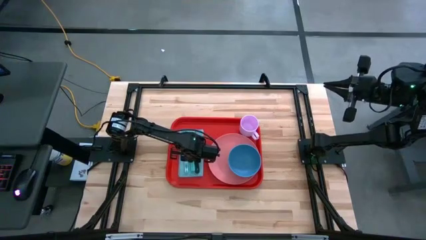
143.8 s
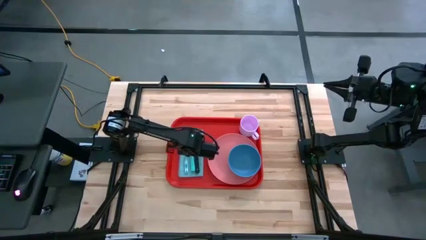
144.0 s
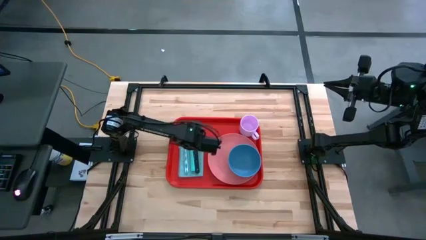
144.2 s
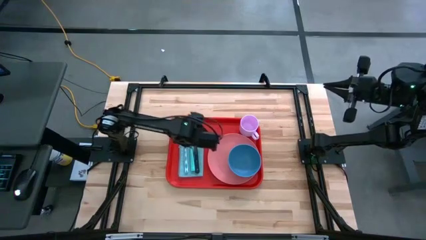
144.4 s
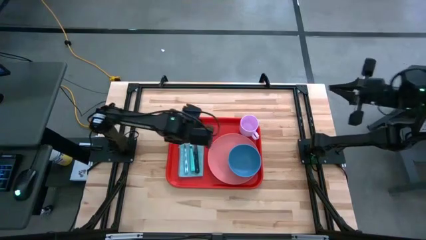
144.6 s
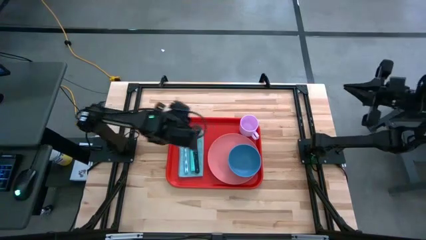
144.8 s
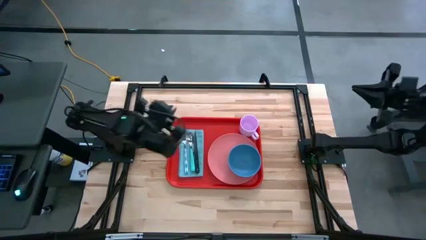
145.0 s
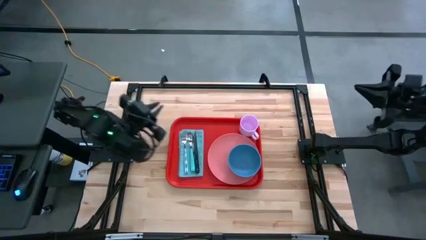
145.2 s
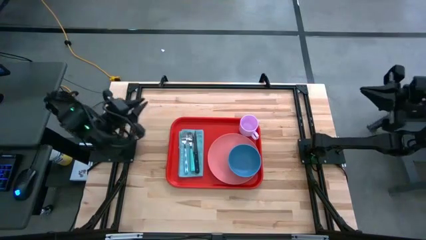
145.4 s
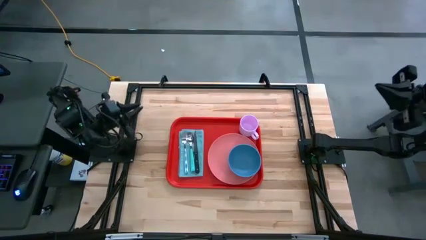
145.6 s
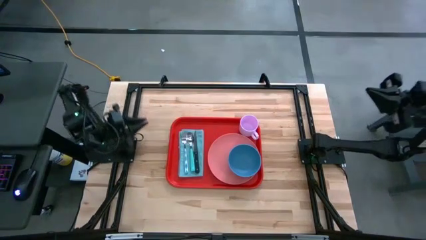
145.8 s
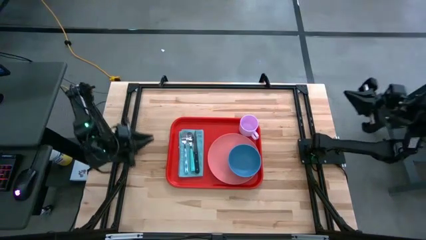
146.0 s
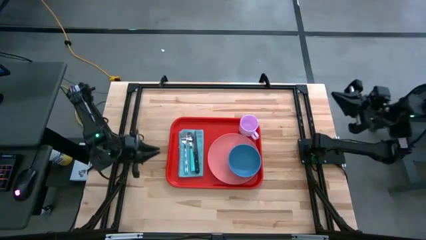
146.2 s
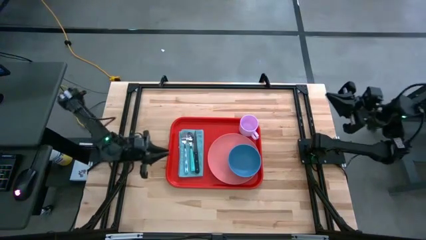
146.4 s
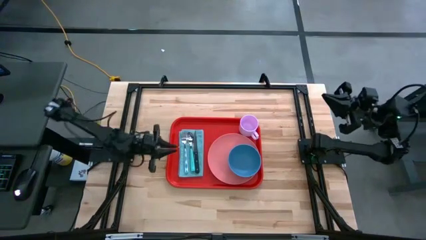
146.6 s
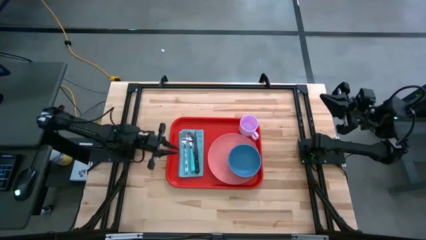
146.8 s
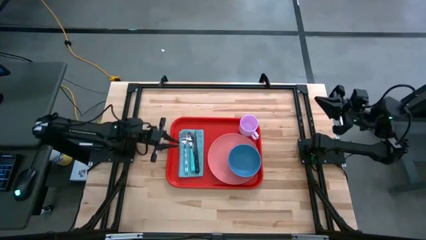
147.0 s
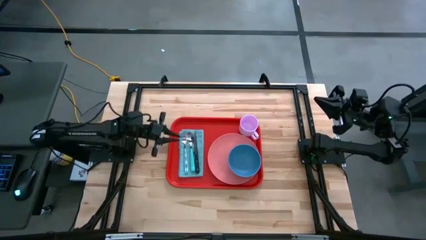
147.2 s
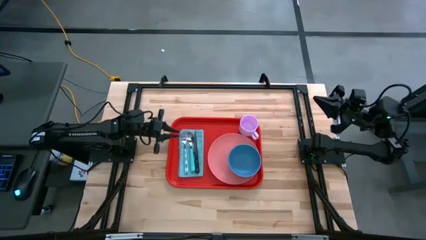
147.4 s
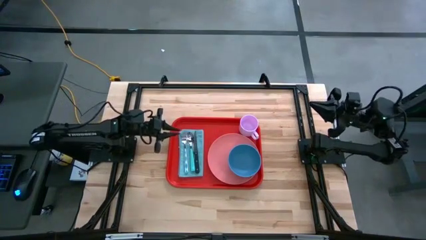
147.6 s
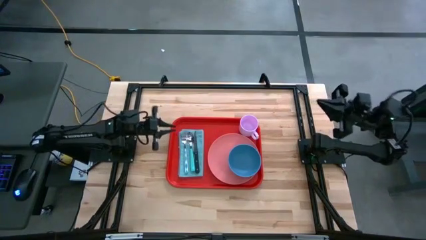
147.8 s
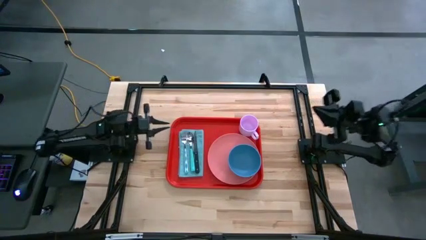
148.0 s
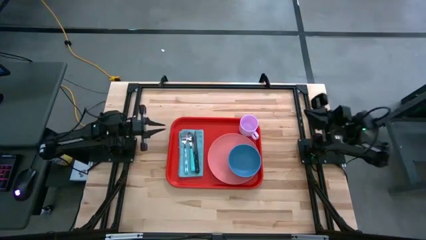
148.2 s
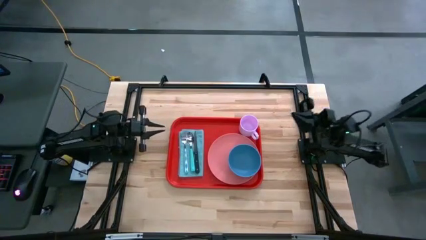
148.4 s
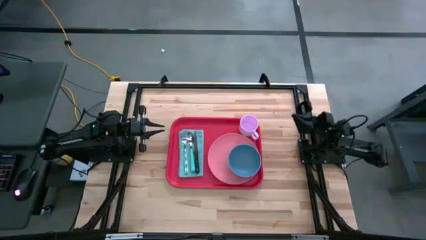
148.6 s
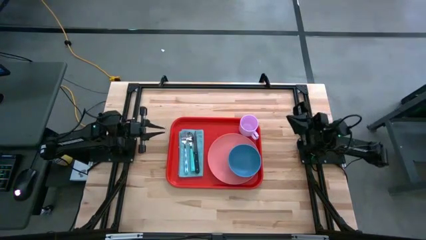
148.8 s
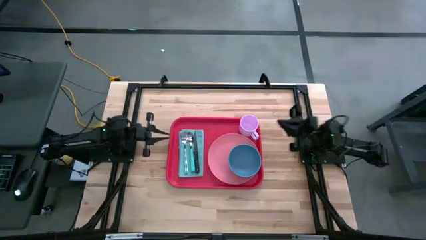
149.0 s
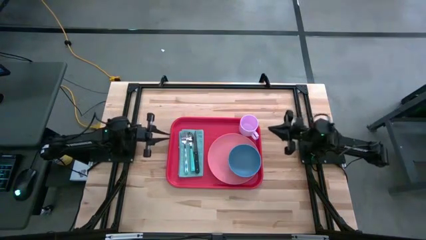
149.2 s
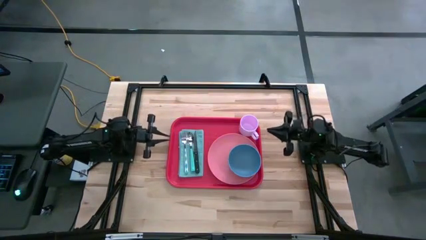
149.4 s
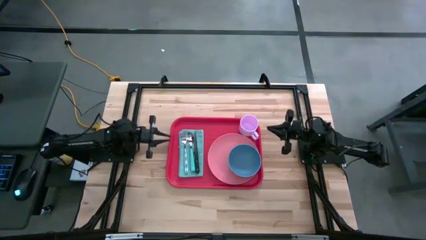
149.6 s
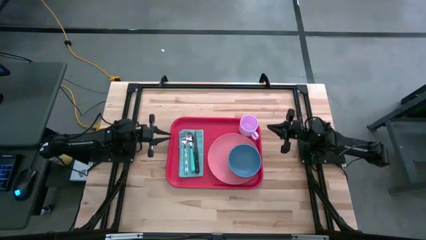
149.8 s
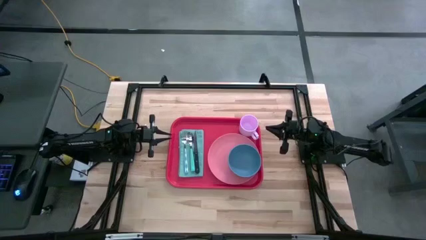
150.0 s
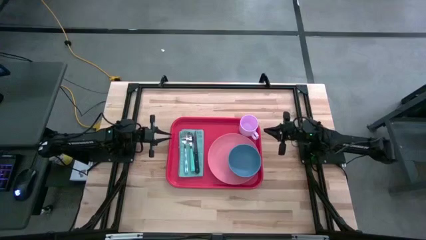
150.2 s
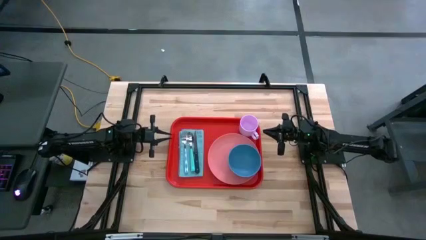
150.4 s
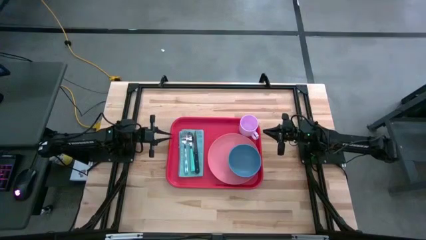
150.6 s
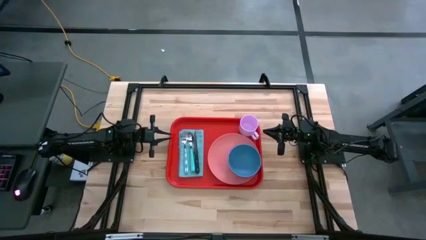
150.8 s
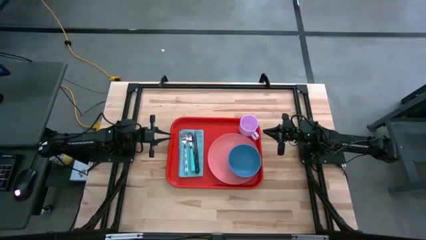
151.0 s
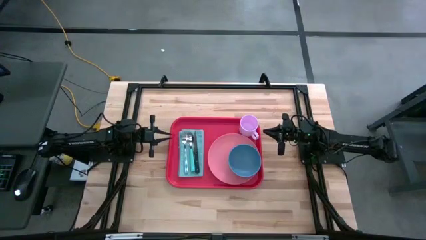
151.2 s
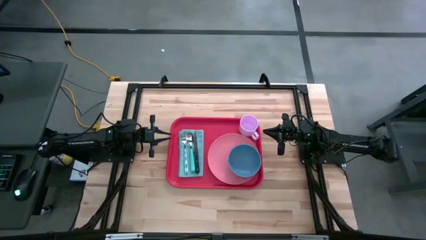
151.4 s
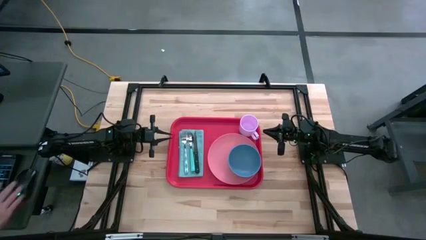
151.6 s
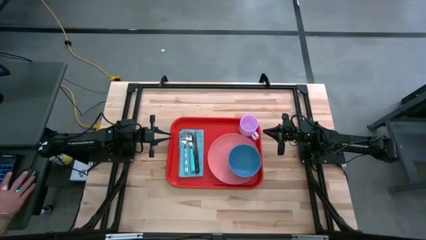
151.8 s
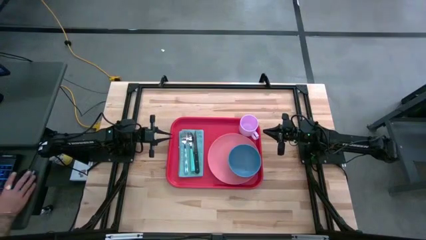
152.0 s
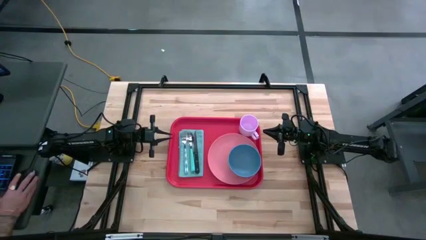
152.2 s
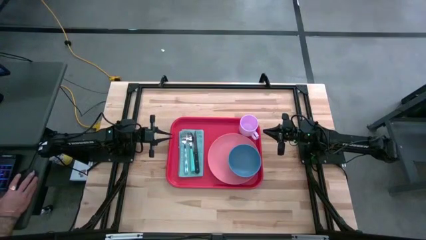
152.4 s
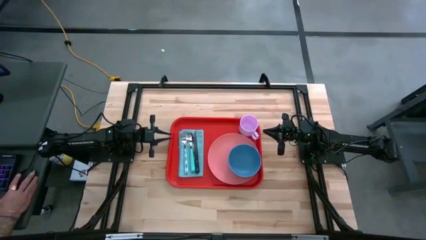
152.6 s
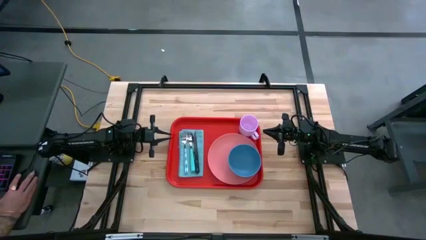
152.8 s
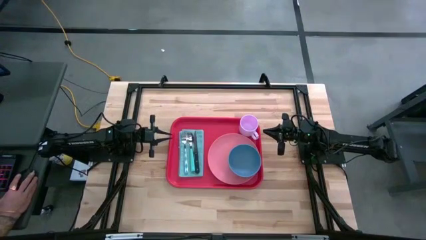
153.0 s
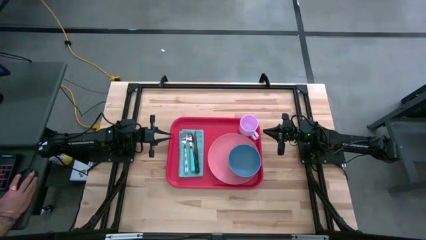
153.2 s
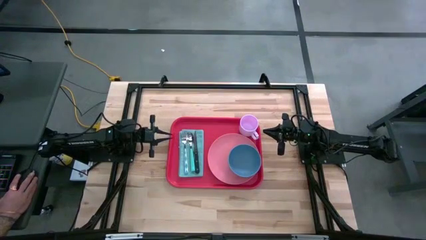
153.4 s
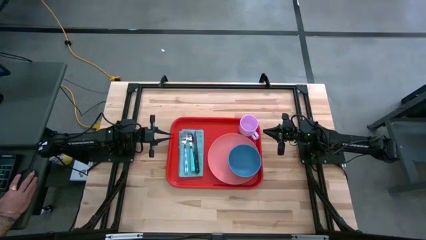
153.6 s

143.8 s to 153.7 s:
Task: Set up tray
Return to Home Position

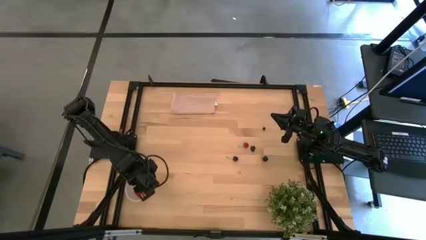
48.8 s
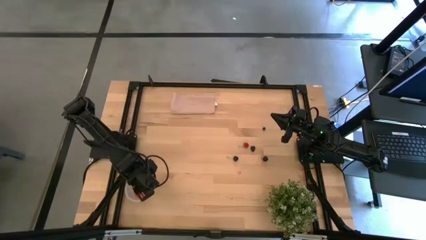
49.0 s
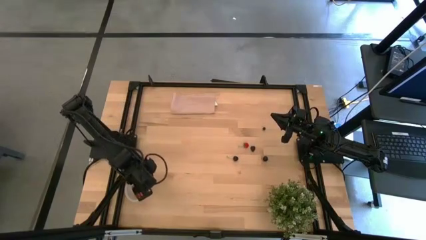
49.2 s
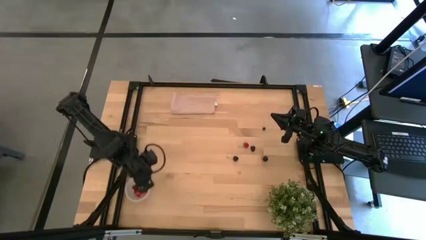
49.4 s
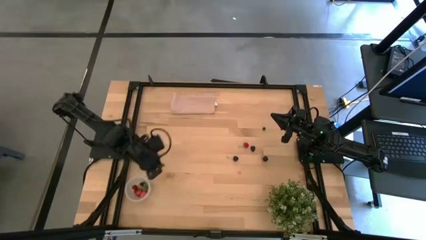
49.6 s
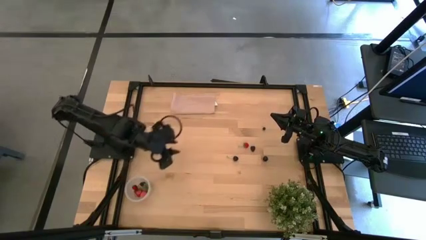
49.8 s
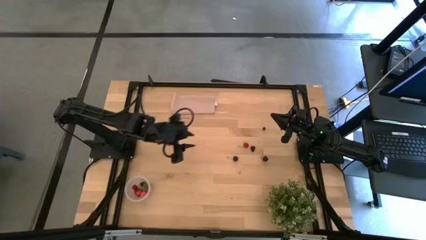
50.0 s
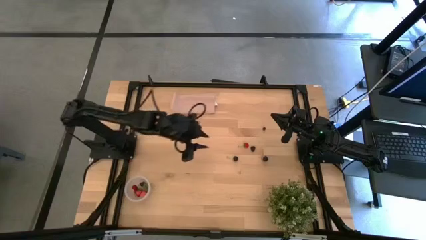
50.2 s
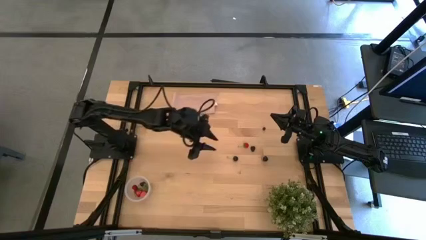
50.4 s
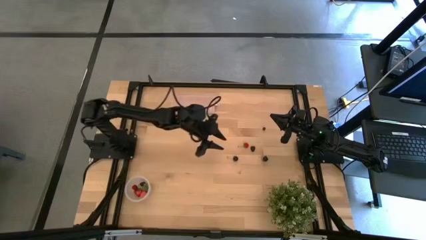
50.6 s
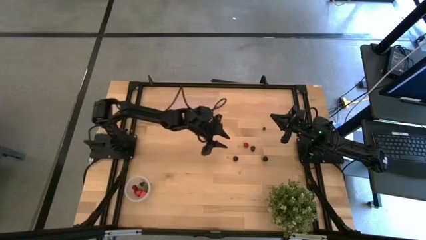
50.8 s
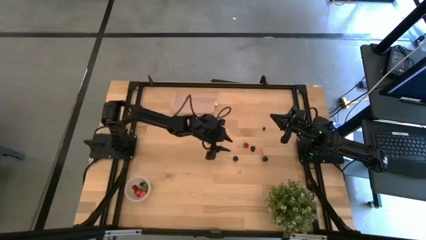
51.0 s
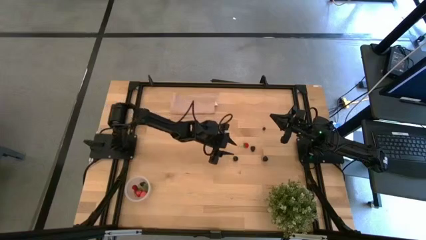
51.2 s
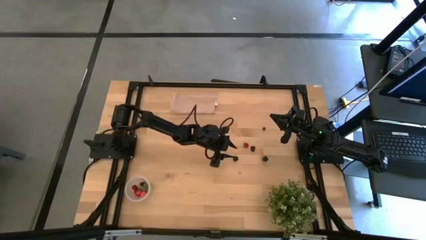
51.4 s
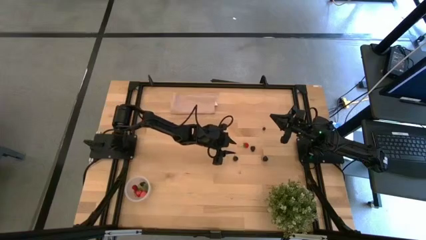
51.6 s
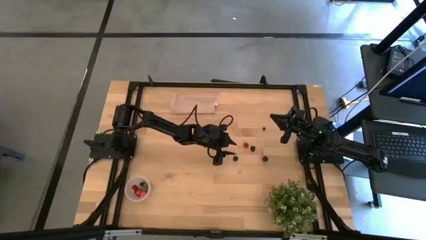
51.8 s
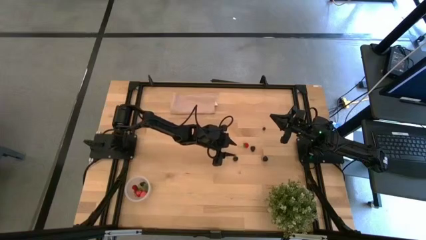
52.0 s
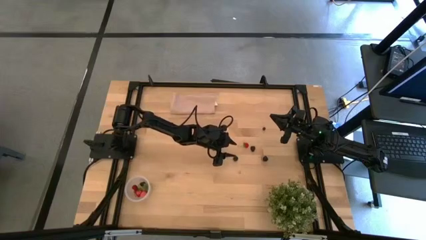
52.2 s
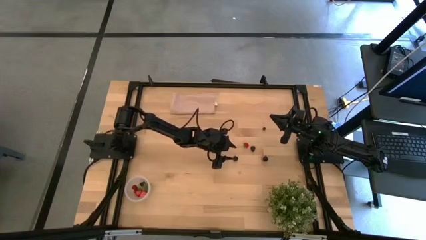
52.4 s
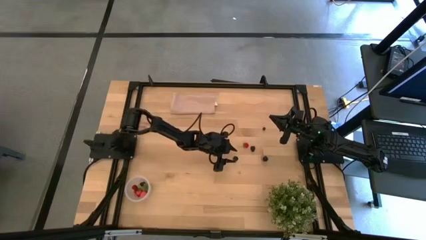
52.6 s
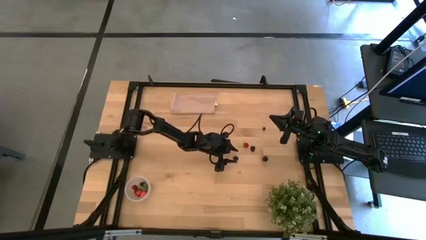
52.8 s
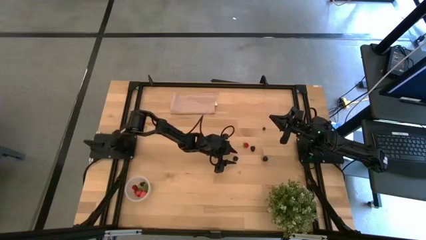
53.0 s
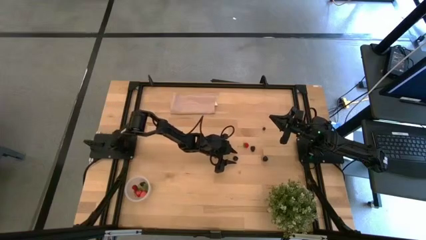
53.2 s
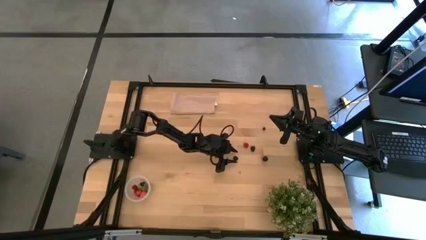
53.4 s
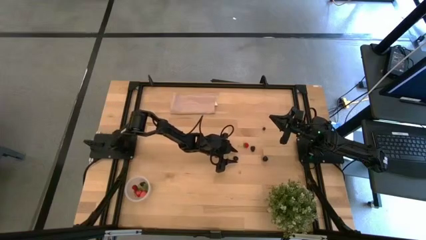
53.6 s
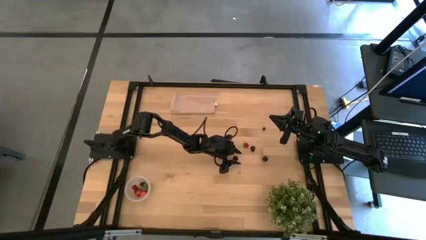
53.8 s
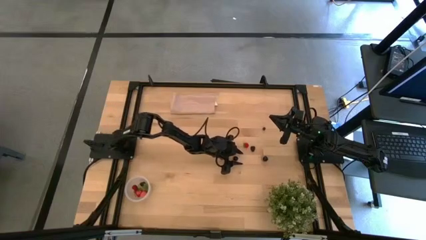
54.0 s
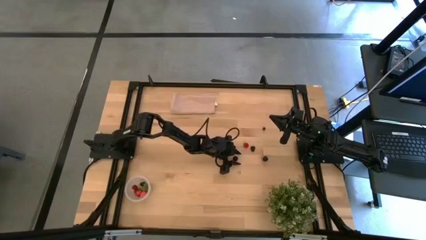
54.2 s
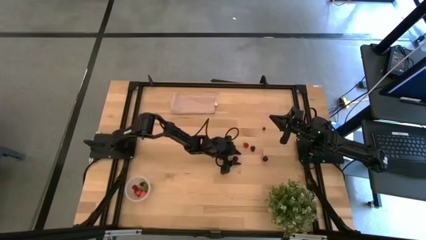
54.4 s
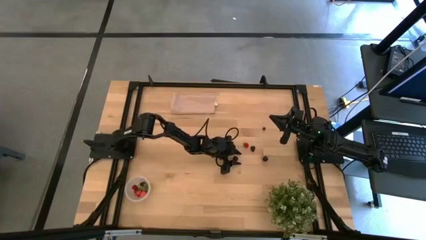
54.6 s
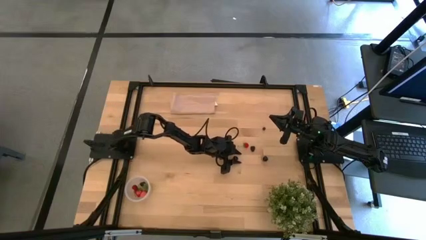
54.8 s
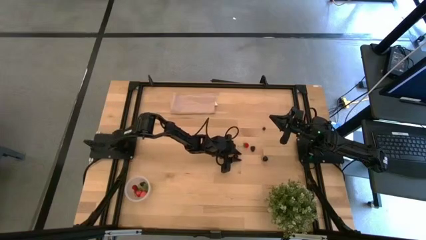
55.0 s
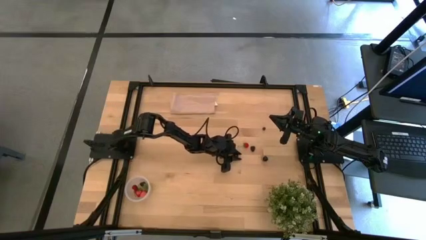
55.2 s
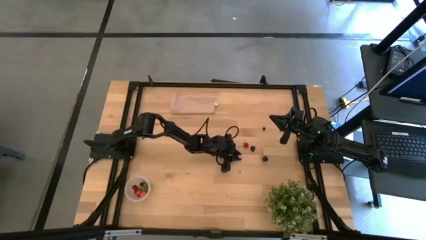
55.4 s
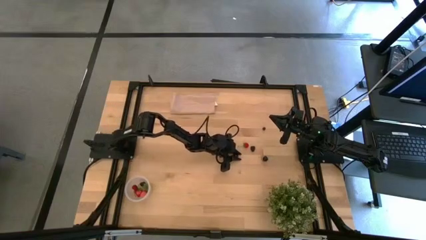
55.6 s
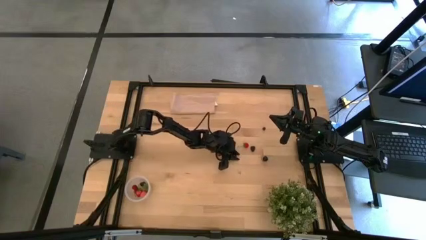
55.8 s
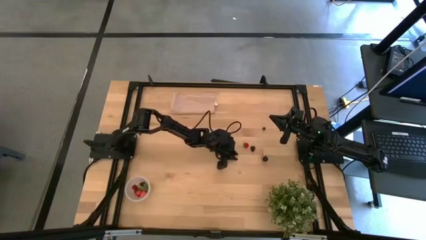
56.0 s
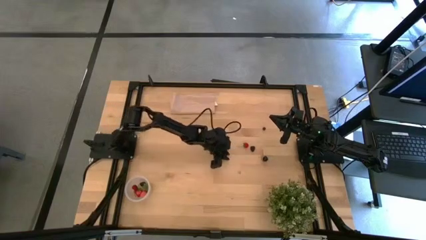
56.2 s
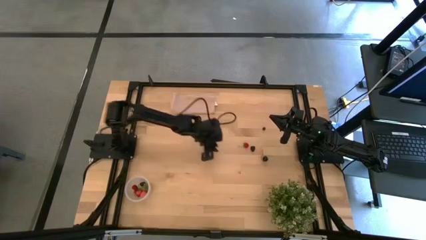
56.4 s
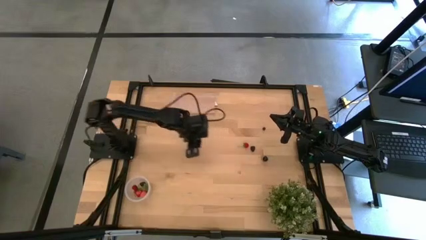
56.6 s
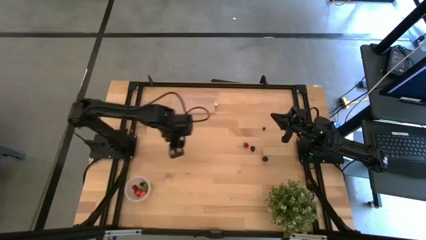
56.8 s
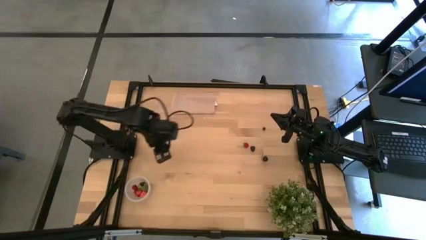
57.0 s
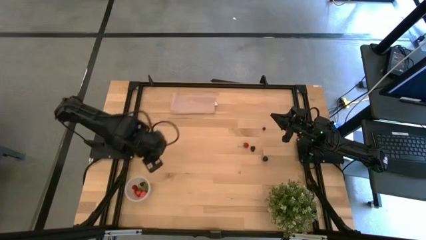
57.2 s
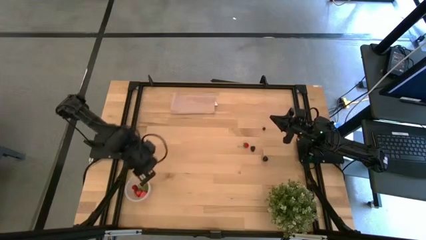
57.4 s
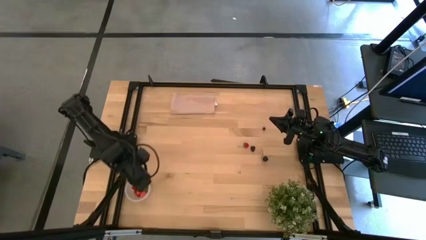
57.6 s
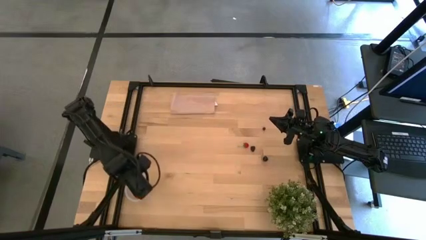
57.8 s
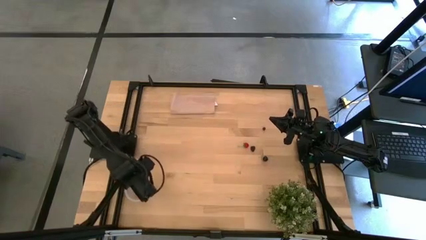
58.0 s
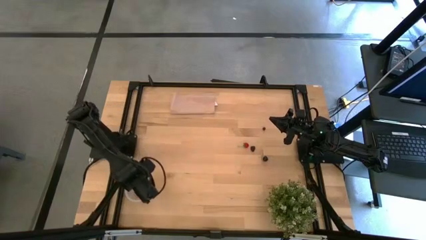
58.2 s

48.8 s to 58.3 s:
Task: Pick and placing Produce into tupperware
Put the left black cherry into the transparent bin
